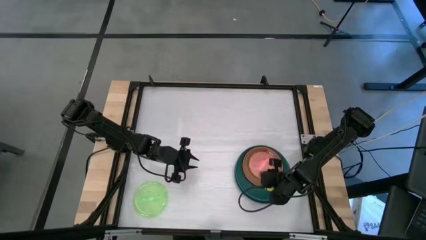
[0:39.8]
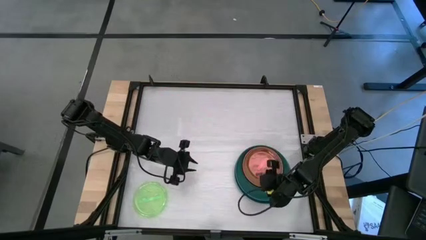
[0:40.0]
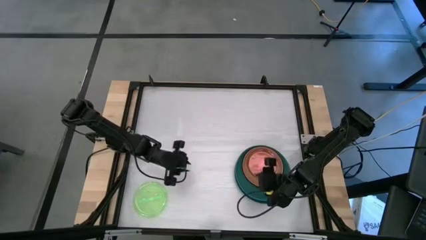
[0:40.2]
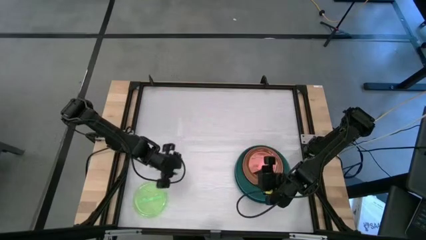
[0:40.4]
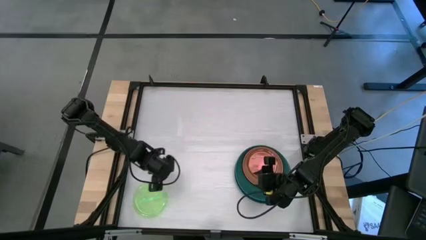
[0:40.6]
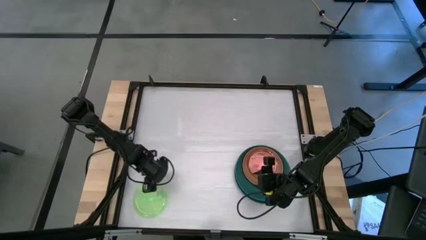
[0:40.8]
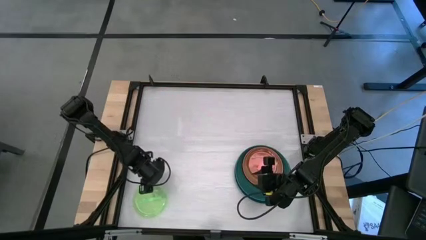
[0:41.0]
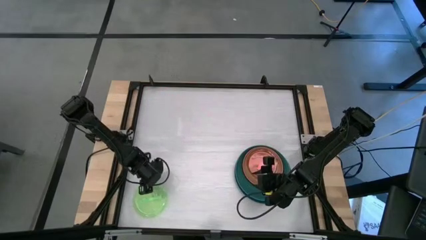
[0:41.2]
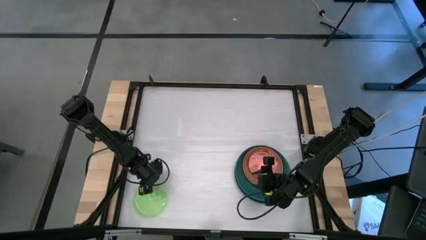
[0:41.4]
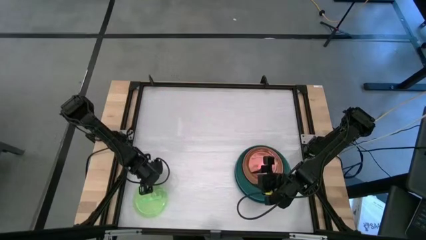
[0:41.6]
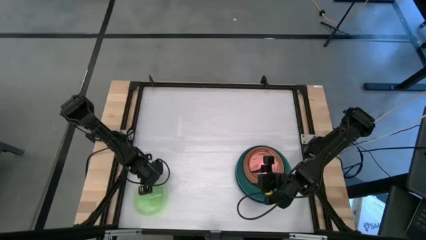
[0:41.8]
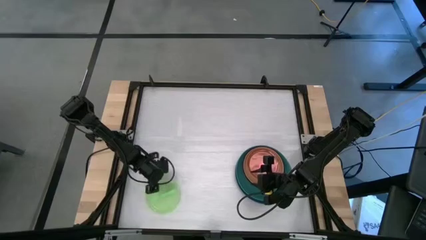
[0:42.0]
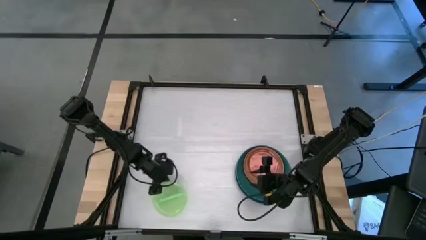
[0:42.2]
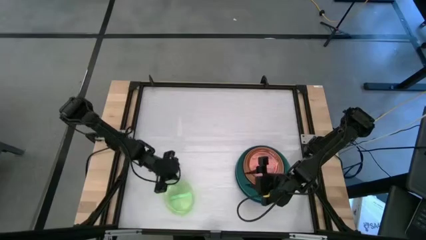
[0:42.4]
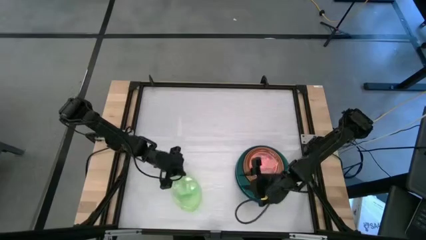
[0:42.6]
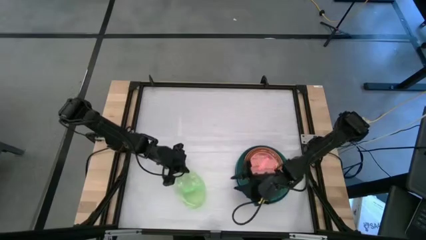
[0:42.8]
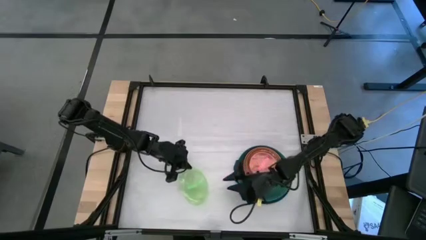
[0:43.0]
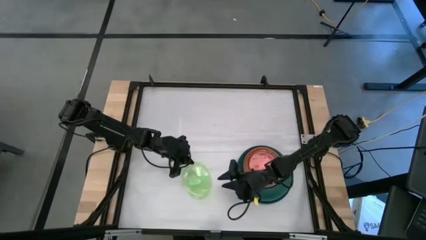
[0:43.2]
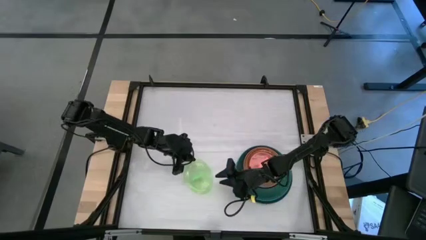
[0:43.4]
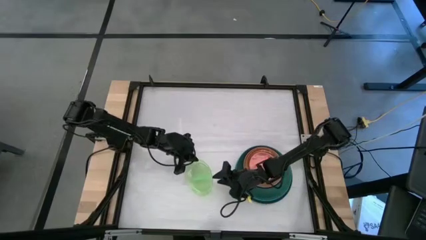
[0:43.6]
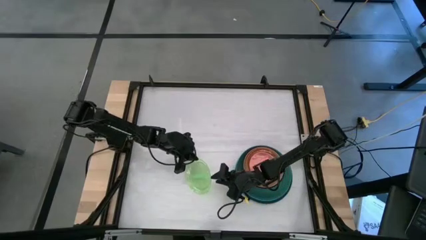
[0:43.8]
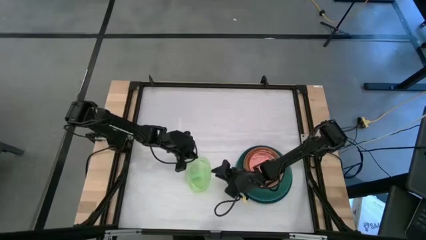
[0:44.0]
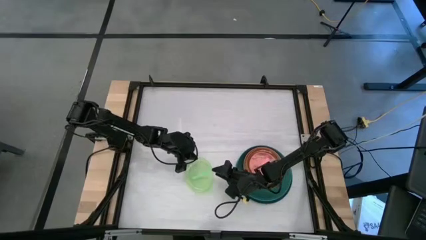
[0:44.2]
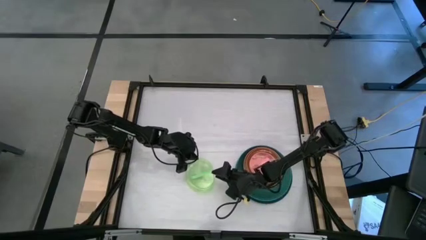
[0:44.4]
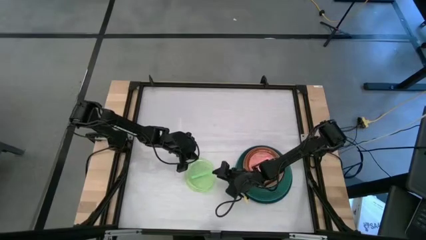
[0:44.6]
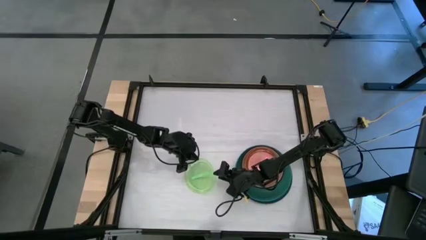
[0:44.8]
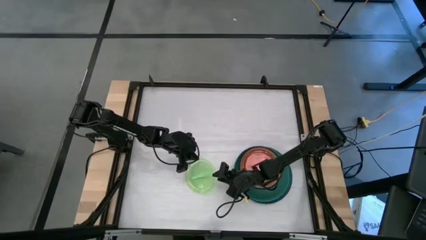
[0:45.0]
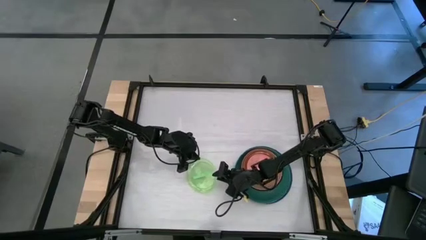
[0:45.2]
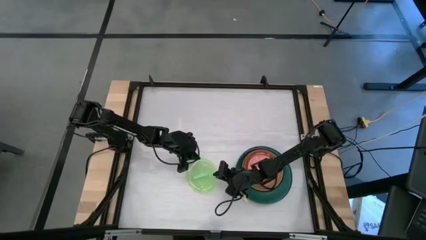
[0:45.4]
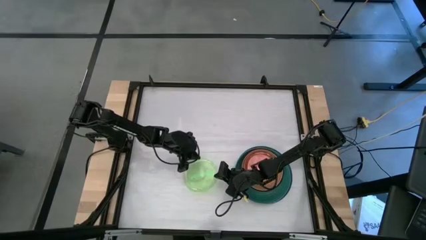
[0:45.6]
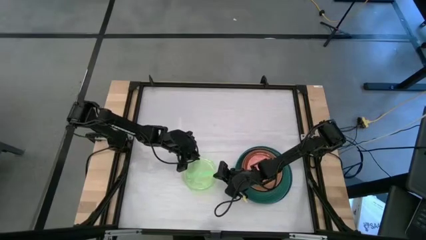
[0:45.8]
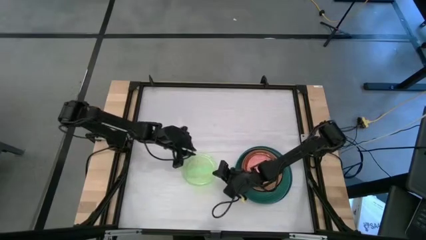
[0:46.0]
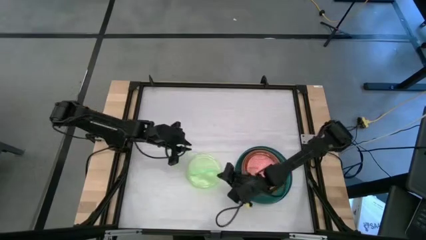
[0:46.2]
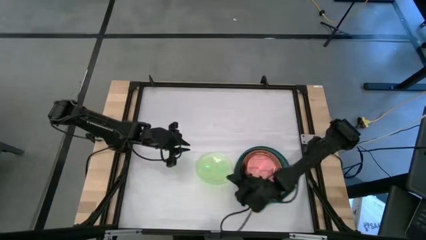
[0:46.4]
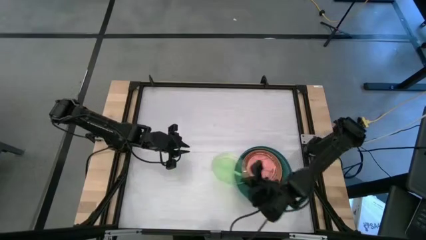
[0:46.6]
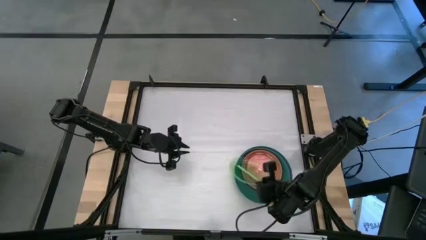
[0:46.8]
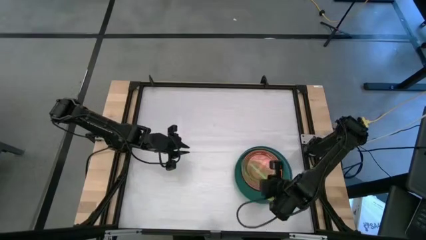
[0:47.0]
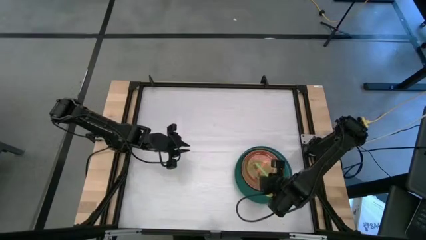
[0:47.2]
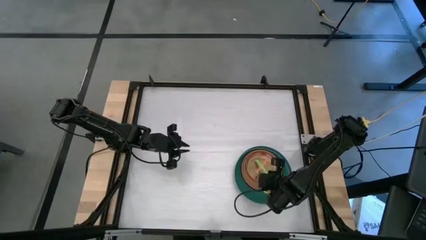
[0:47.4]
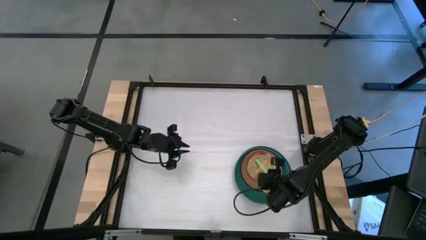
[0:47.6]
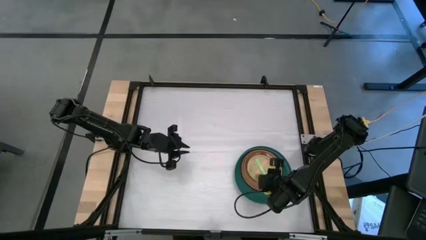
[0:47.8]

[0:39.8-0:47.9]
Task: Stack plastic plates
Stack the light green plate on top of the light pink plate

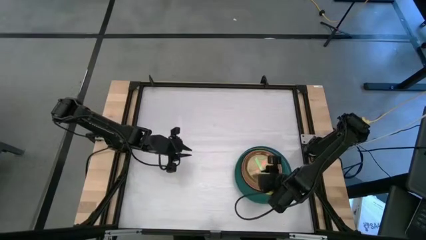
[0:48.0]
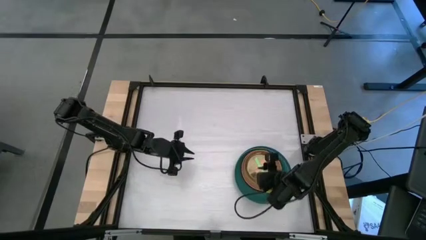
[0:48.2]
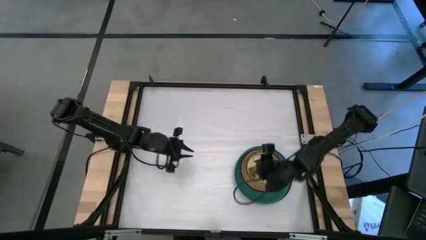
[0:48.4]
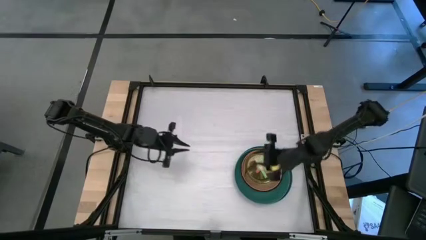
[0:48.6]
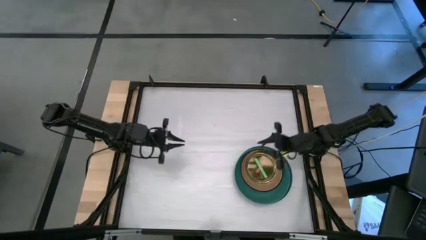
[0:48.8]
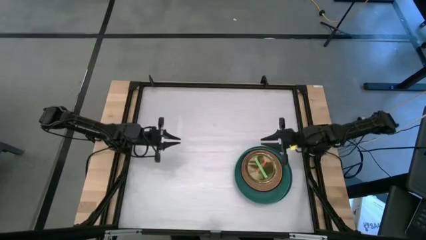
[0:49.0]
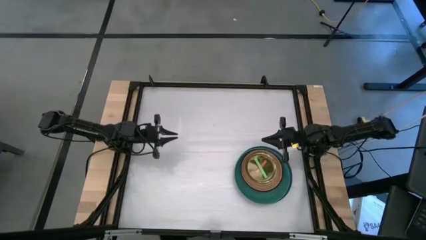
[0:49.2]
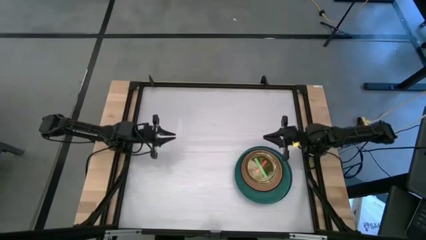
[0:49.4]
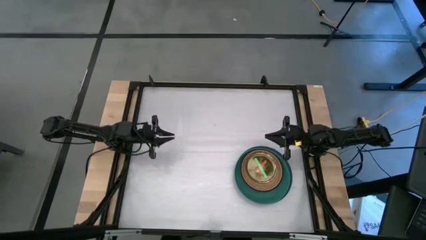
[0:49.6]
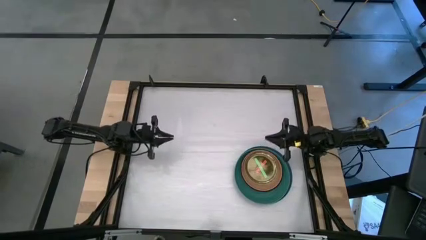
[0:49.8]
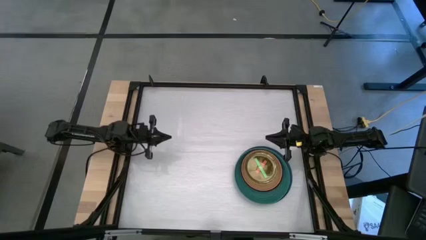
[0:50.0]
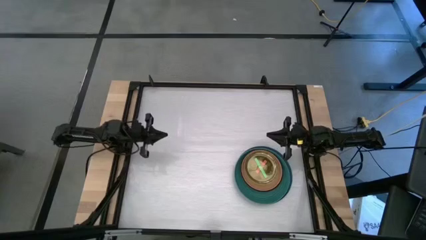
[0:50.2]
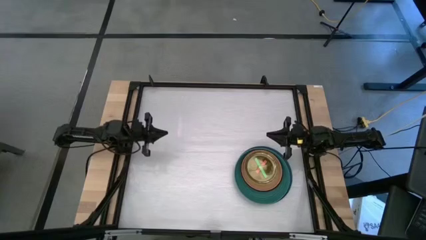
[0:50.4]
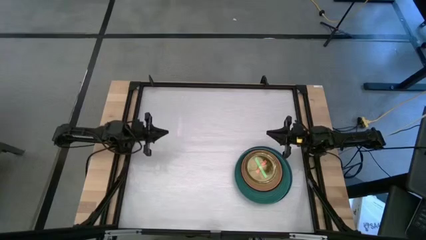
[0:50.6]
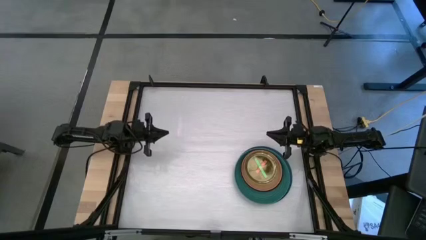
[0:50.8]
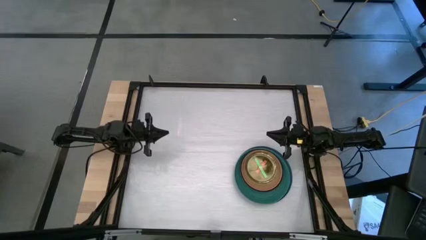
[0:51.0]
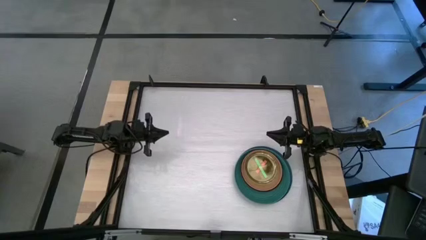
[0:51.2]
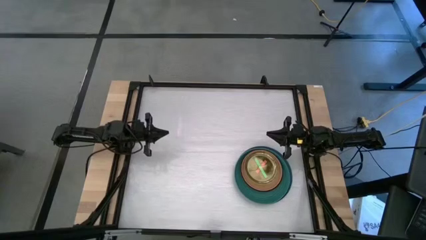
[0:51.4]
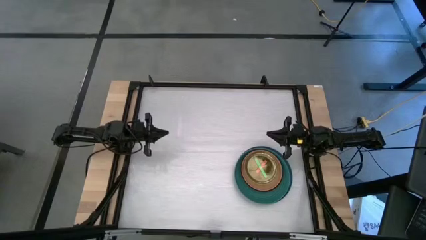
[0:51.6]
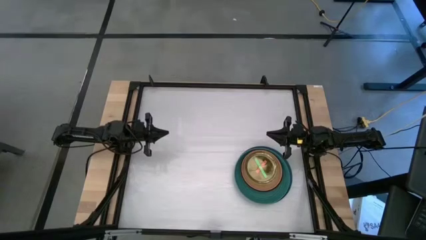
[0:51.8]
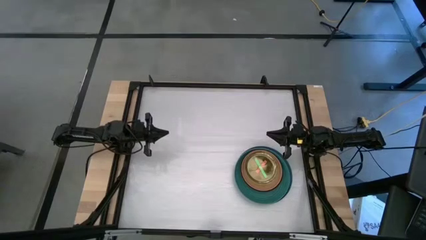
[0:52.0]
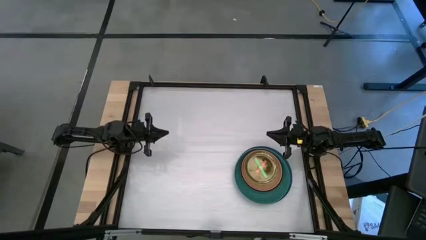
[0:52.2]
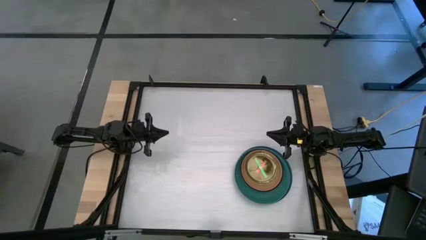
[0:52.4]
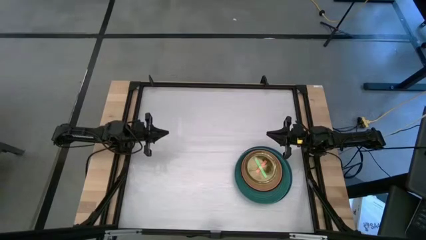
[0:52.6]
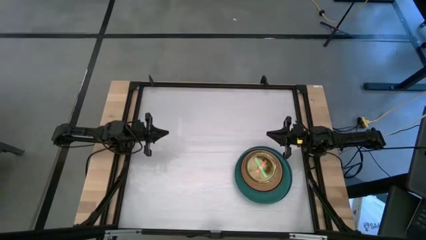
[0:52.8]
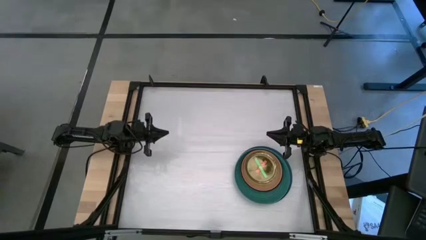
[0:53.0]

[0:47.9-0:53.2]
Return to Home Position

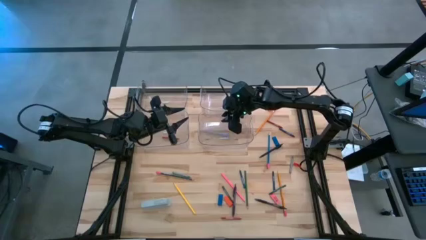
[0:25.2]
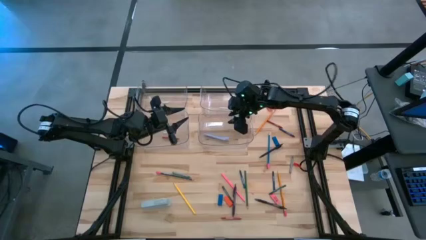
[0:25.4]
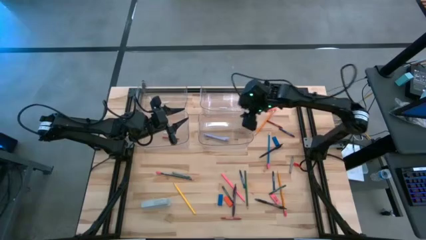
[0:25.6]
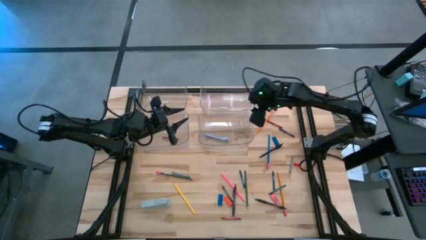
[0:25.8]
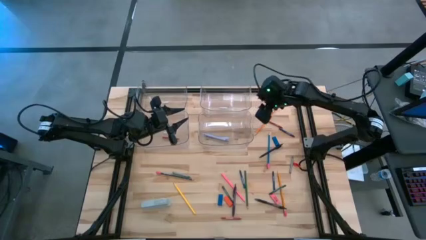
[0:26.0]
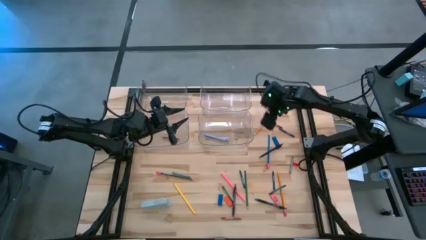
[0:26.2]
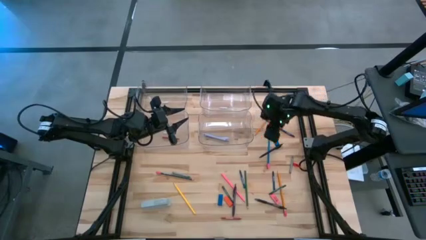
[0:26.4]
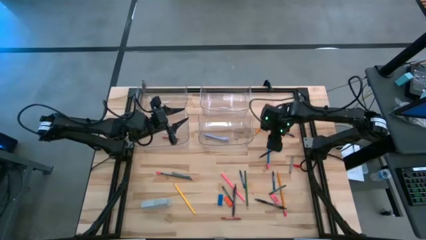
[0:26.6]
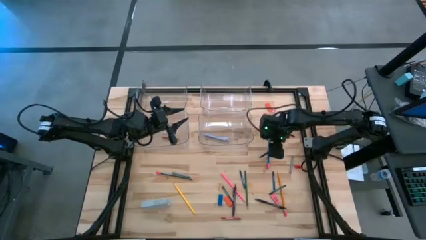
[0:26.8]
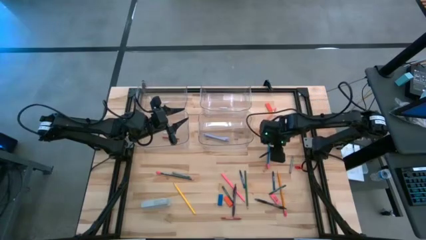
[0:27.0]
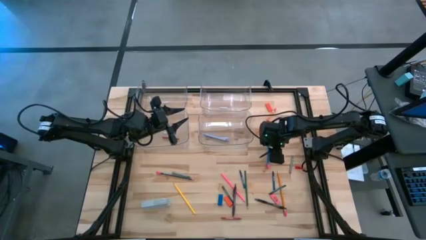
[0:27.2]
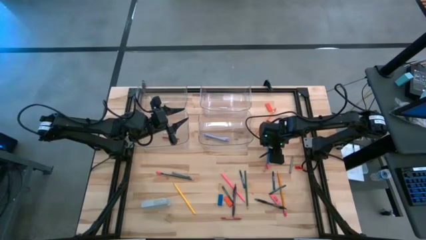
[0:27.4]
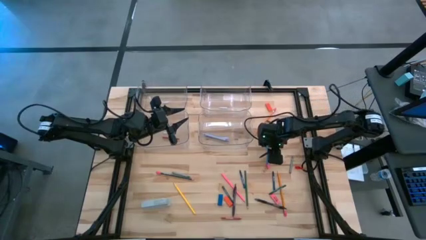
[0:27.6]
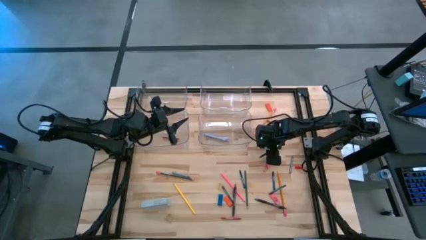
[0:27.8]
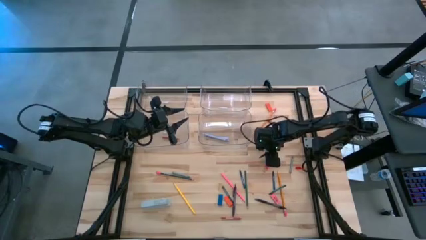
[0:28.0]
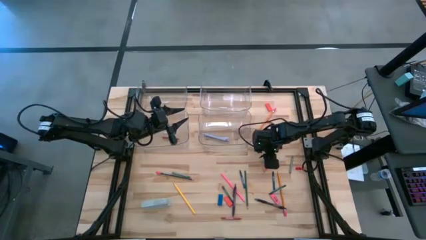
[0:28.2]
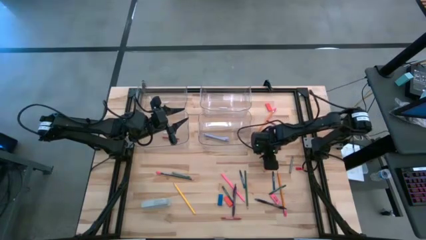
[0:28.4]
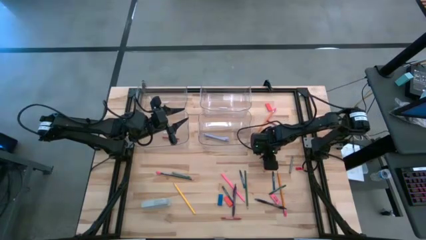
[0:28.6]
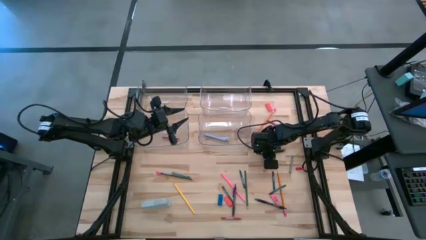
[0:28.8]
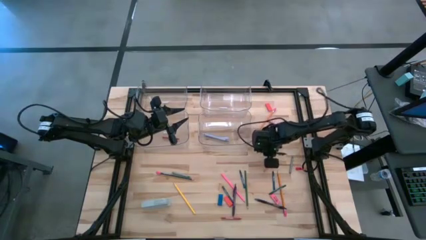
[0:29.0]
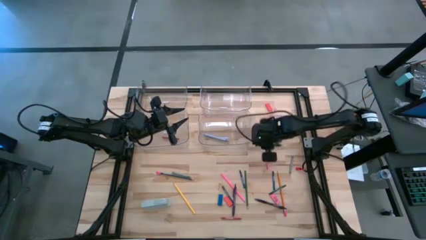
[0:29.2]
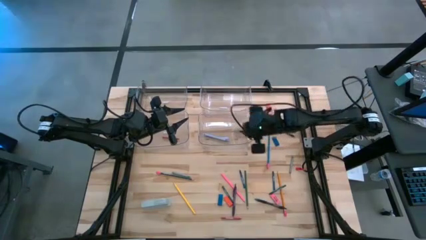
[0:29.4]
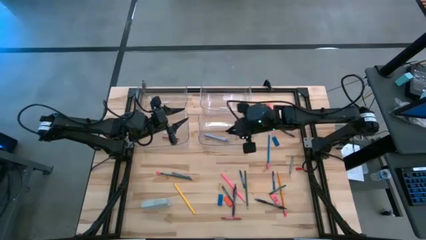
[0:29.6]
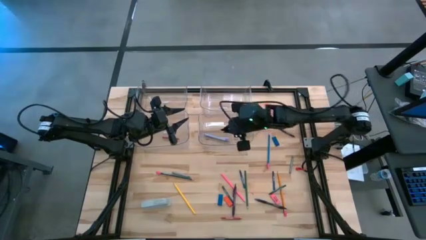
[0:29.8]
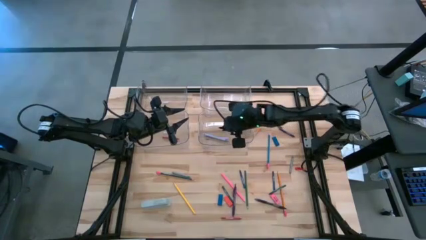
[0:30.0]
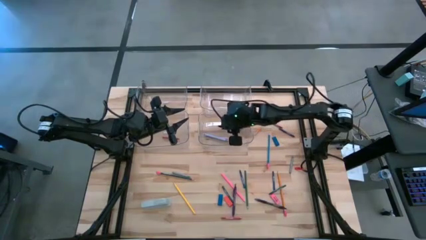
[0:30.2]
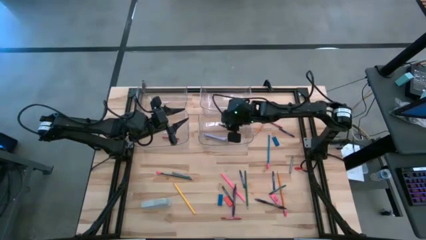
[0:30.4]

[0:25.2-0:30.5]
Task: Sort crayons/erasers/pens/pencils in bins
Put the top black pen into the bottom right transparent bin
